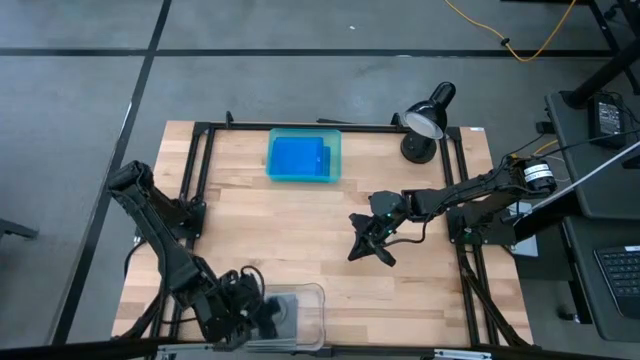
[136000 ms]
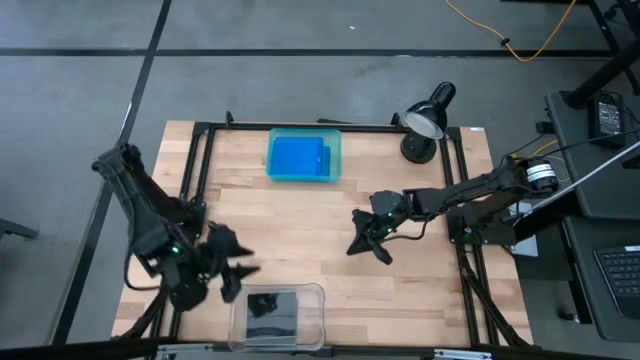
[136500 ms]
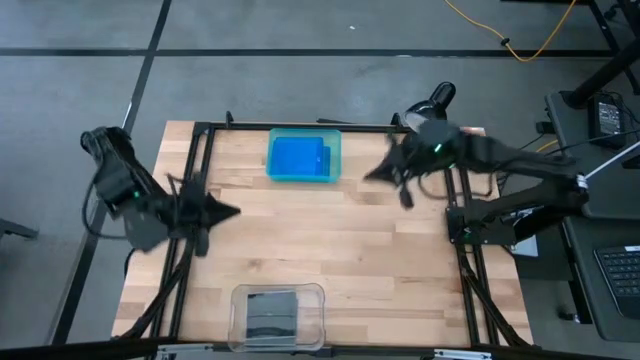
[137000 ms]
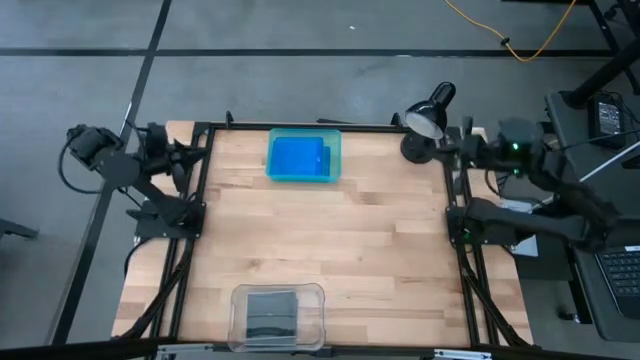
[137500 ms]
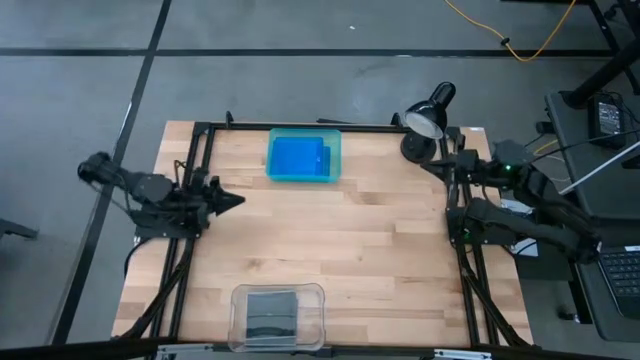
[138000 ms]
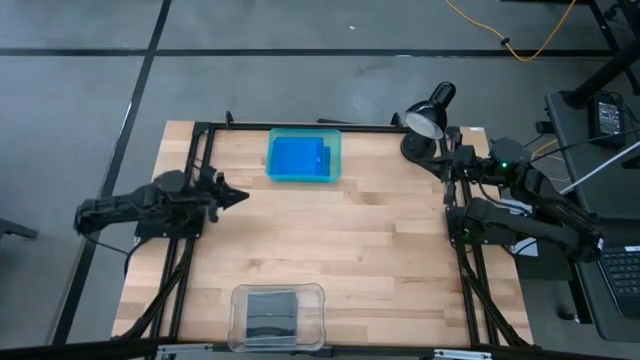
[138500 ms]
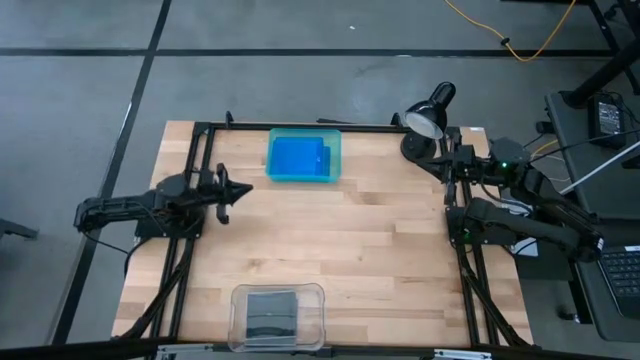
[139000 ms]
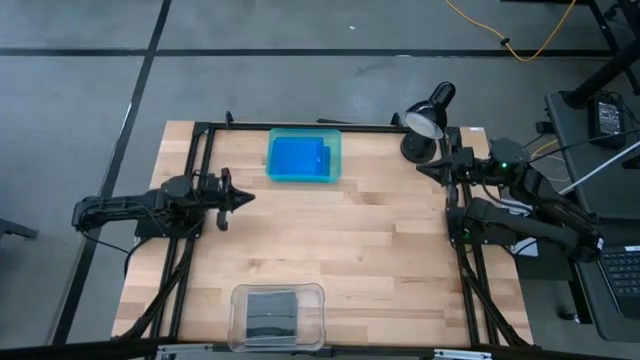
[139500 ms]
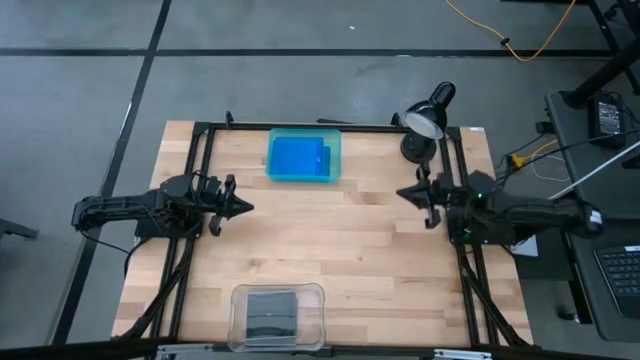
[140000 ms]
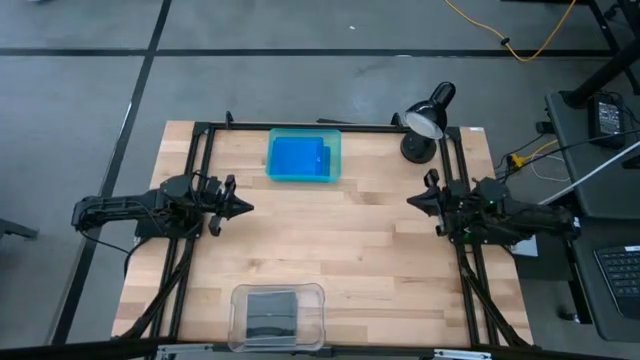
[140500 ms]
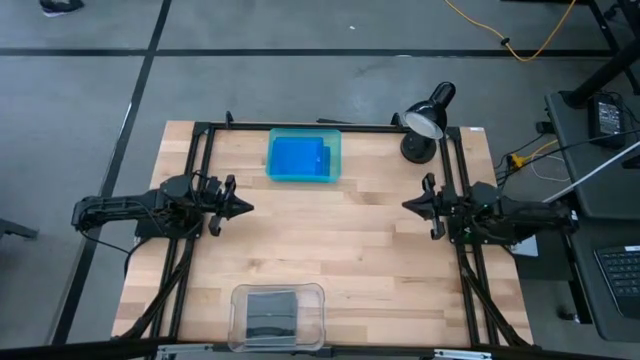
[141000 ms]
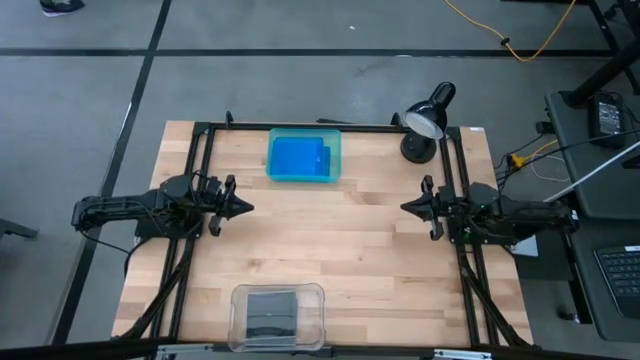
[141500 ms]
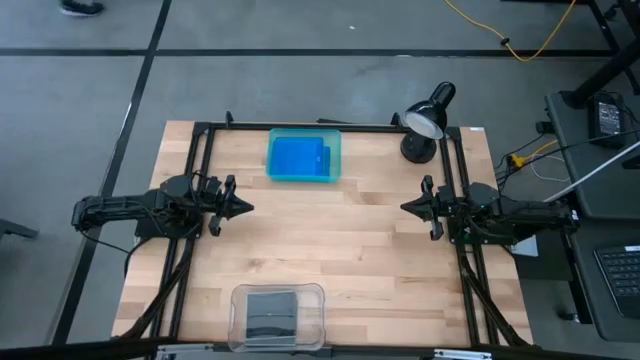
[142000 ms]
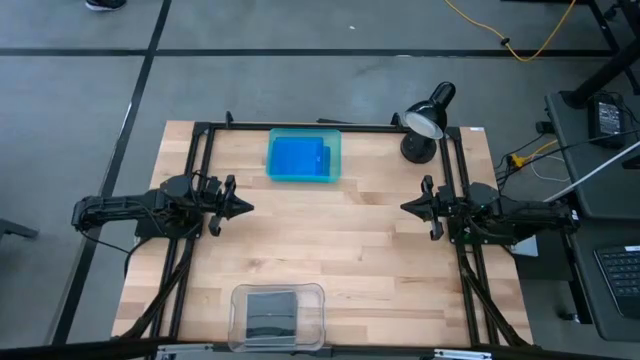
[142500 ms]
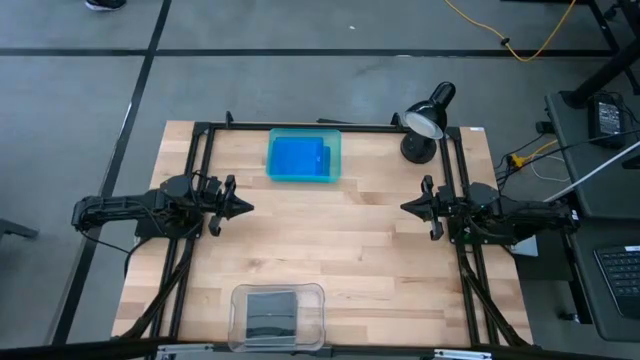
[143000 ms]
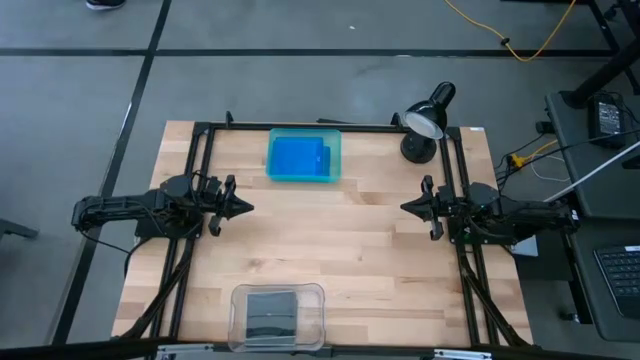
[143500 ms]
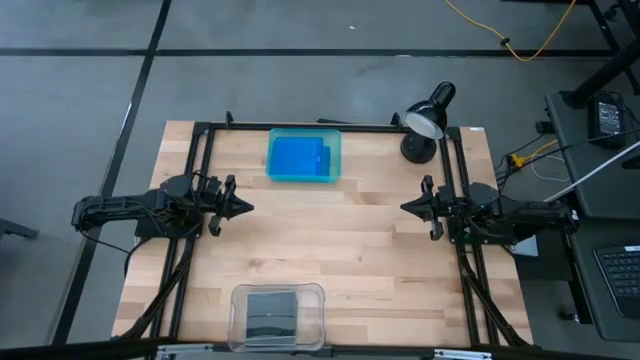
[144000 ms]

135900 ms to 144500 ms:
Task: Pick & place jewel cases by type
Return to Home Position

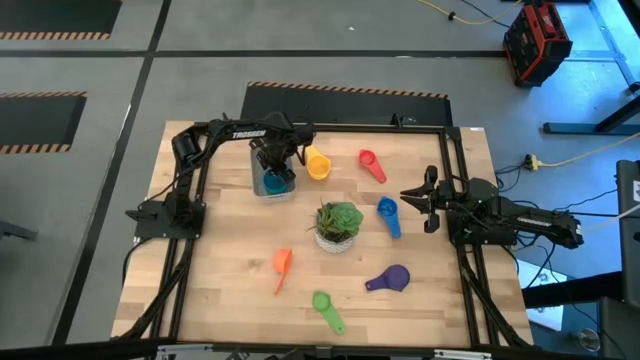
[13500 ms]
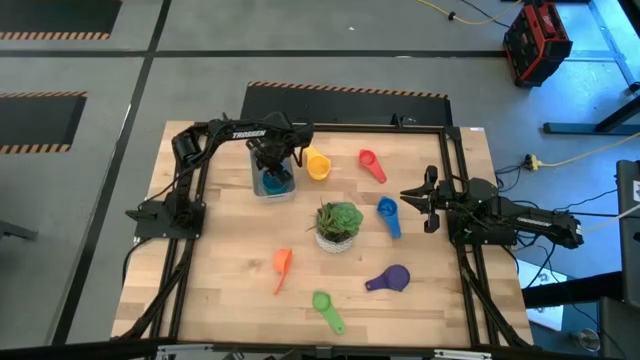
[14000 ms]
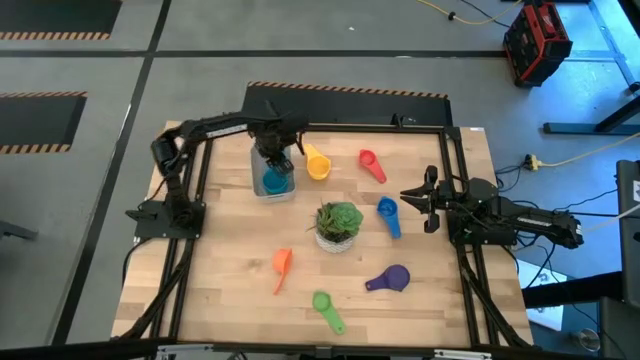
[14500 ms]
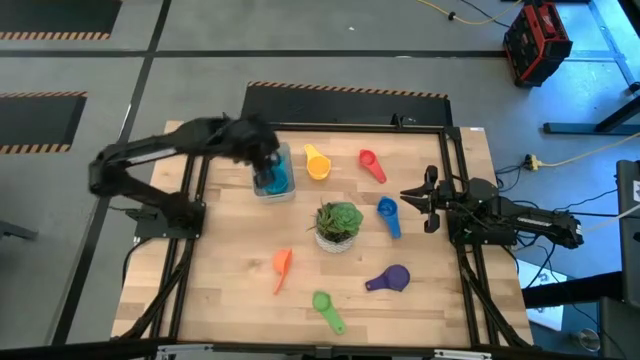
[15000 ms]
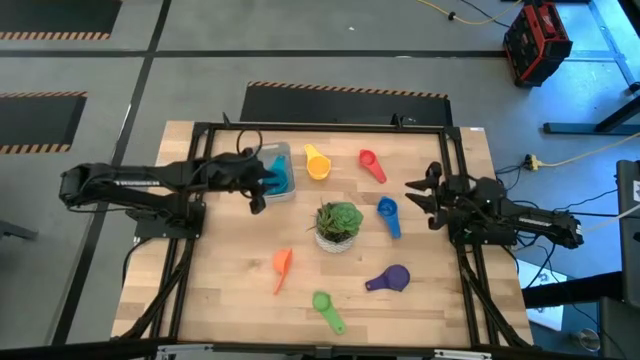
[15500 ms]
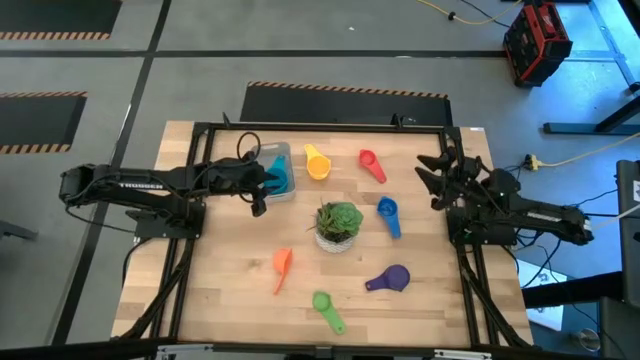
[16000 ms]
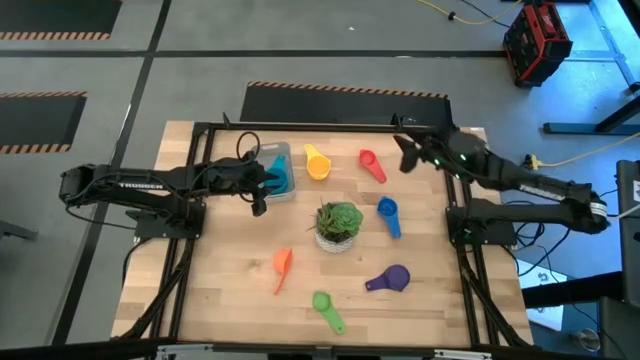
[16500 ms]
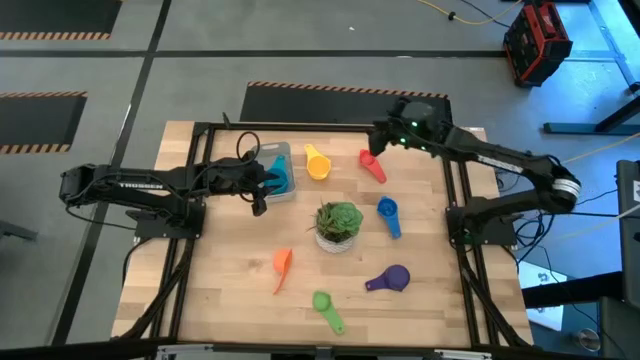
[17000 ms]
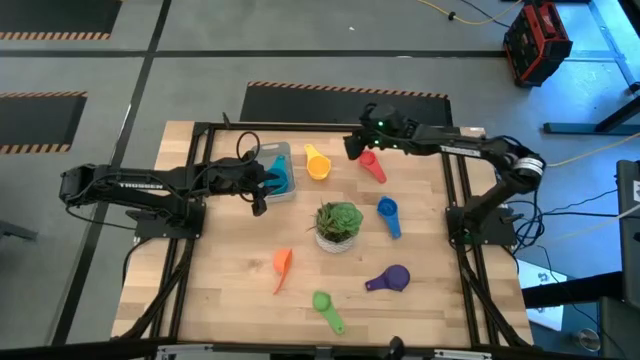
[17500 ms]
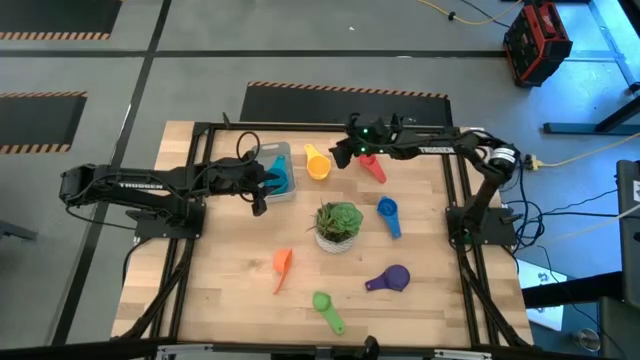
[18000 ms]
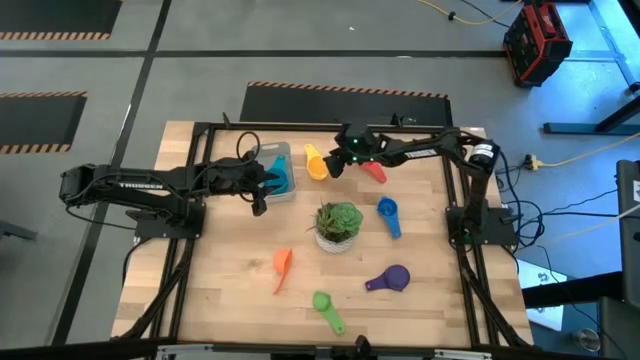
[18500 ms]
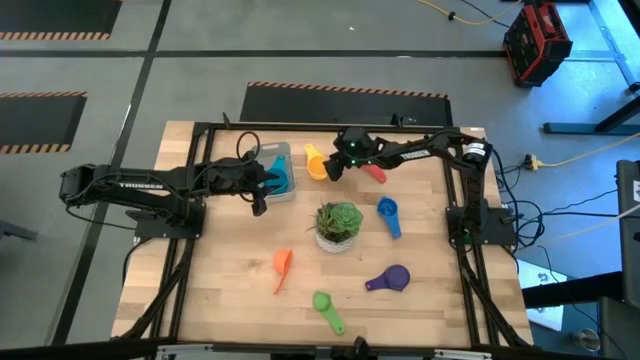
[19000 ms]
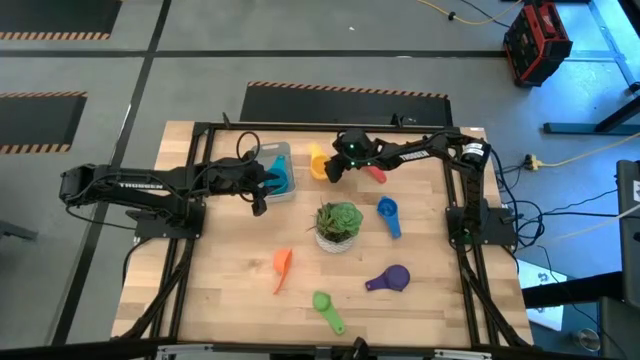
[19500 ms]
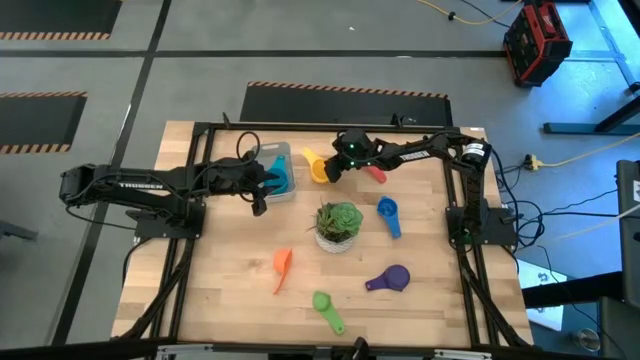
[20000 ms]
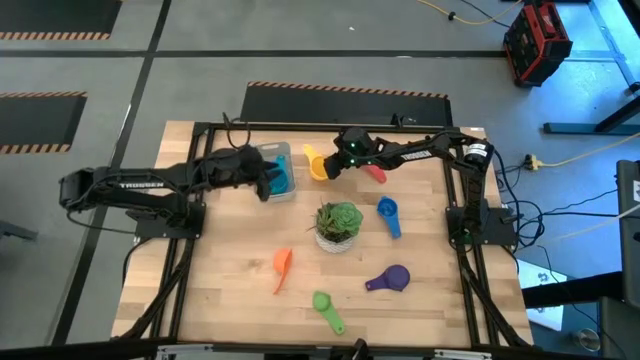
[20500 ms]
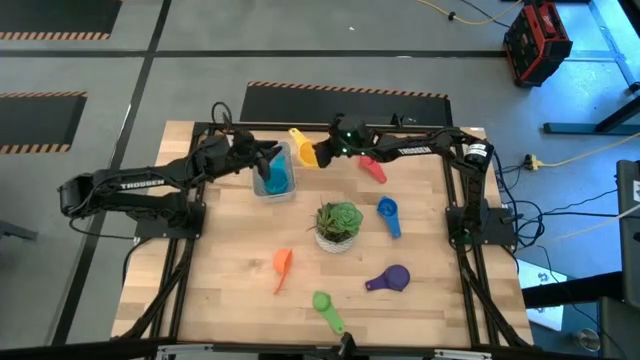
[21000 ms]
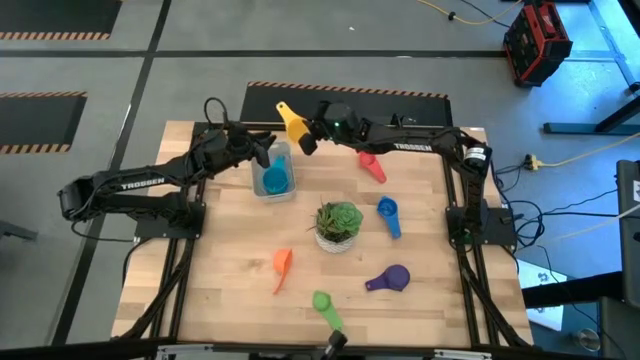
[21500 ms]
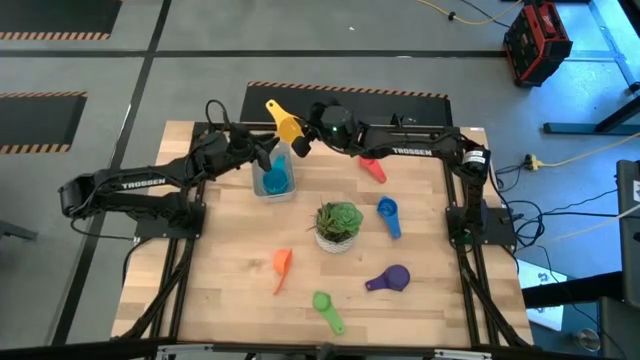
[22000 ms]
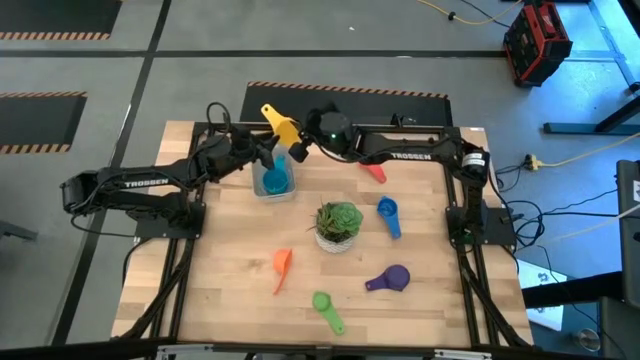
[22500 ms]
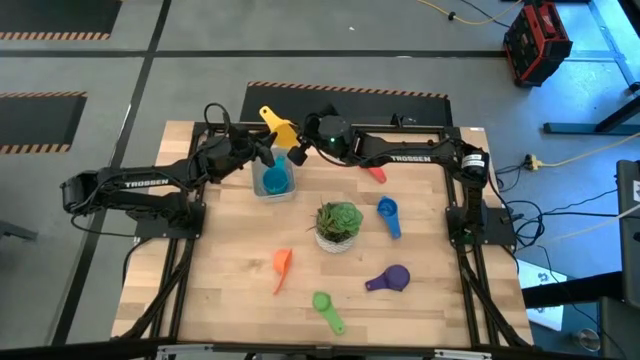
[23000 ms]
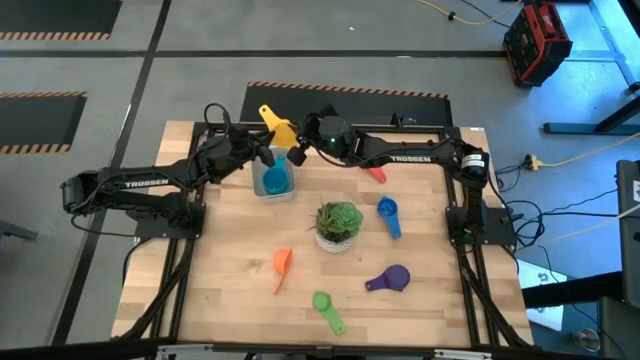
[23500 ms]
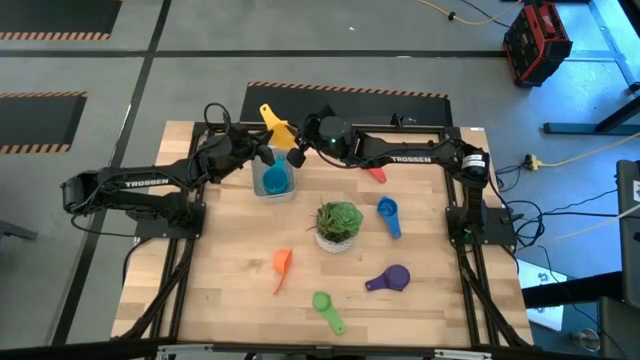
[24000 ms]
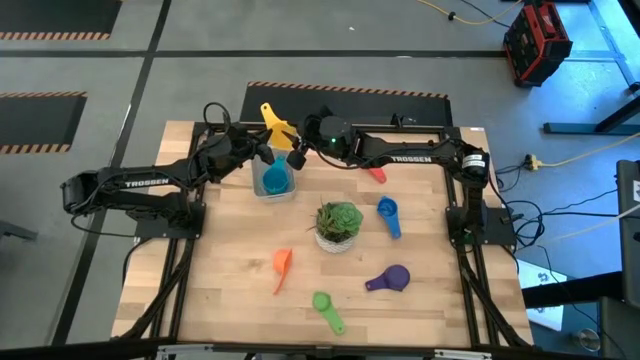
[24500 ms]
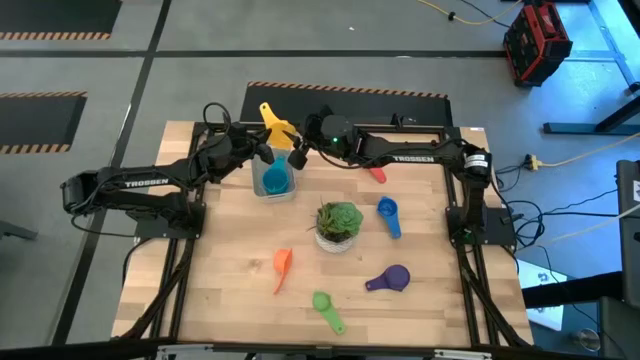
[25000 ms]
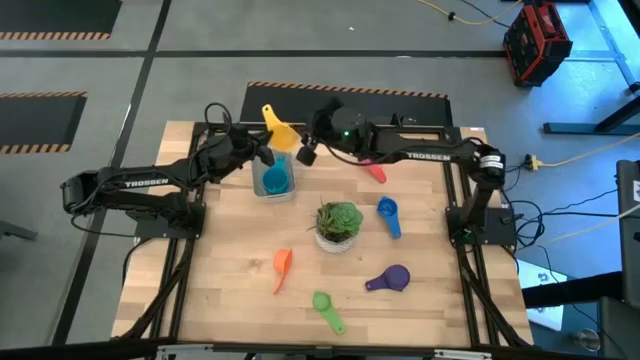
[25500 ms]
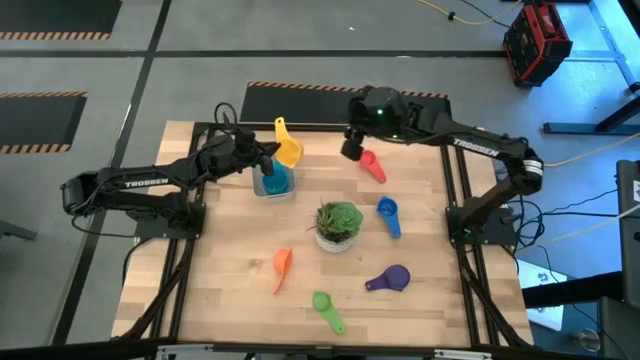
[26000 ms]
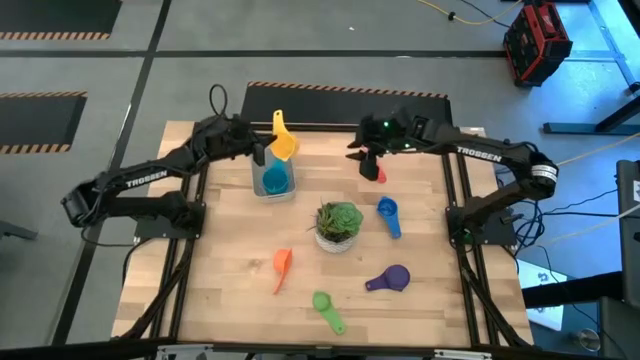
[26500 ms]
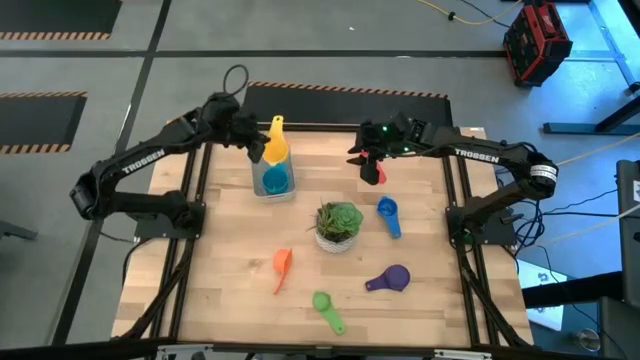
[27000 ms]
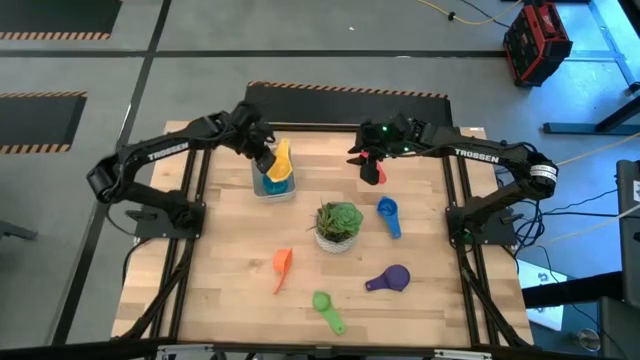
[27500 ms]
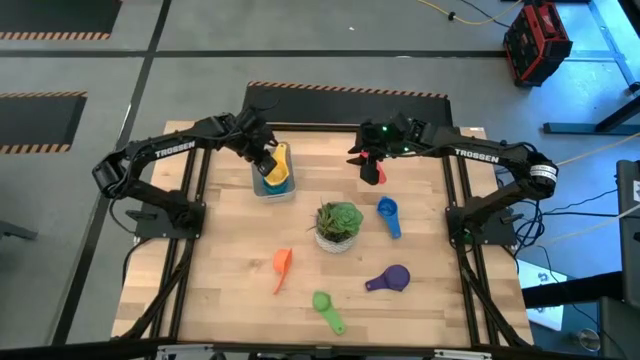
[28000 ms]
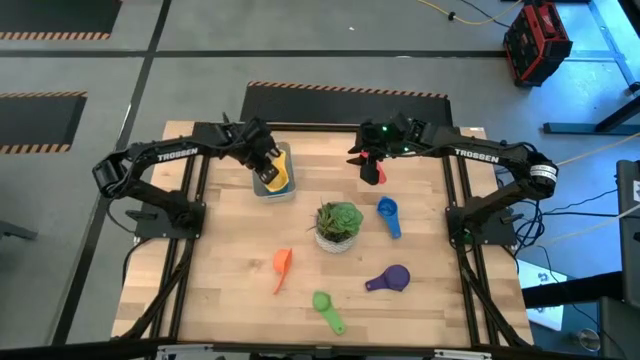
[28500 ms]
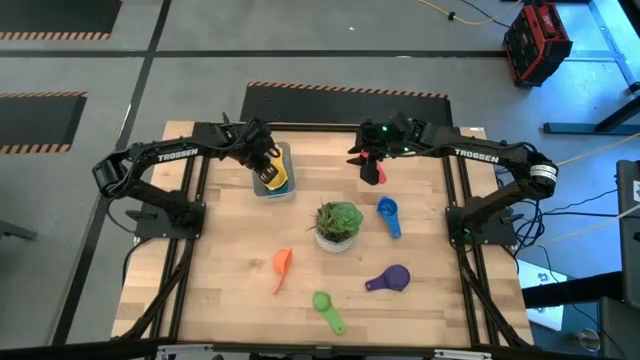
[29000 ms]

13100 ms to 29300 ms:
Task: Nest measuring cups in basket
Stack the yellow measuring cup on top of the light blue measuring cup in the gray bin
